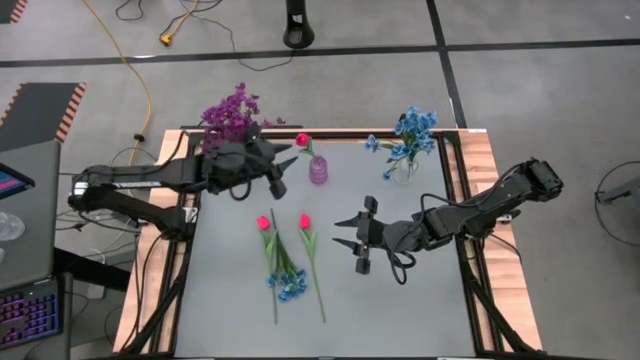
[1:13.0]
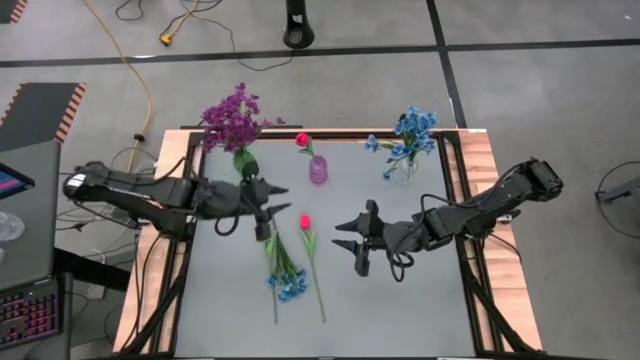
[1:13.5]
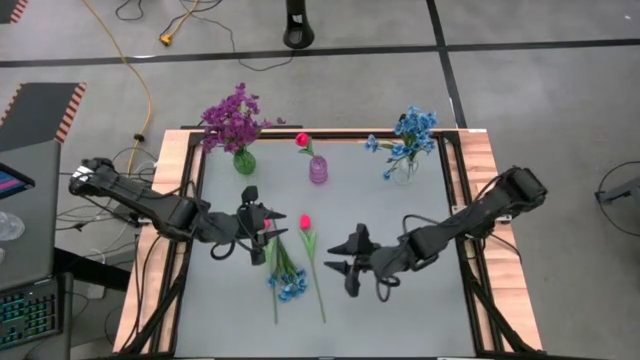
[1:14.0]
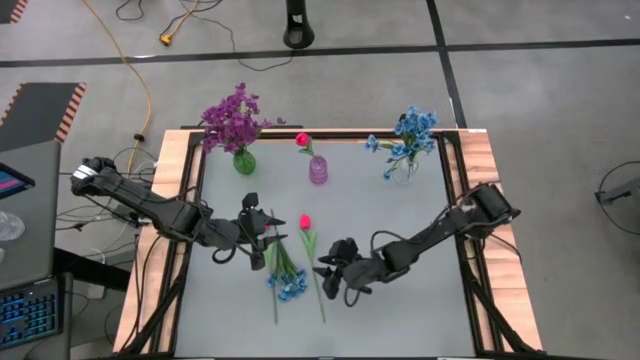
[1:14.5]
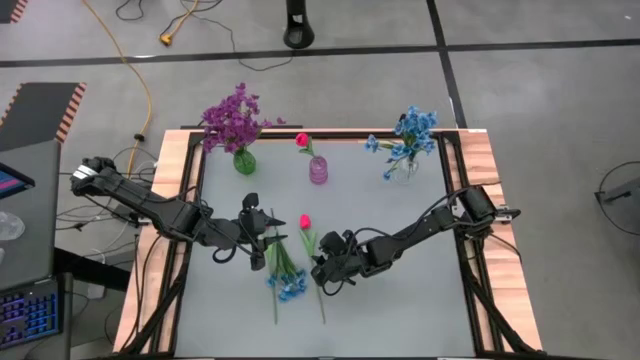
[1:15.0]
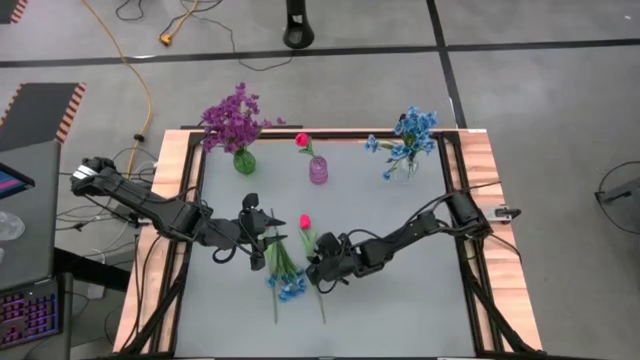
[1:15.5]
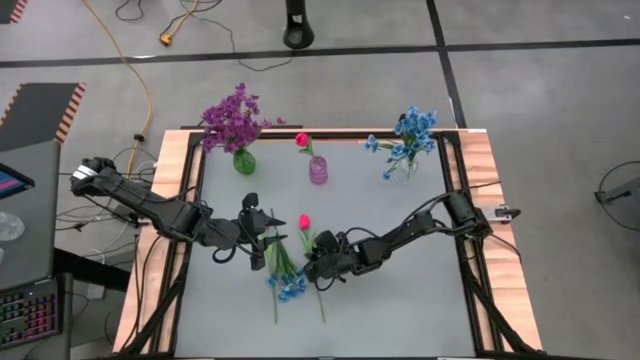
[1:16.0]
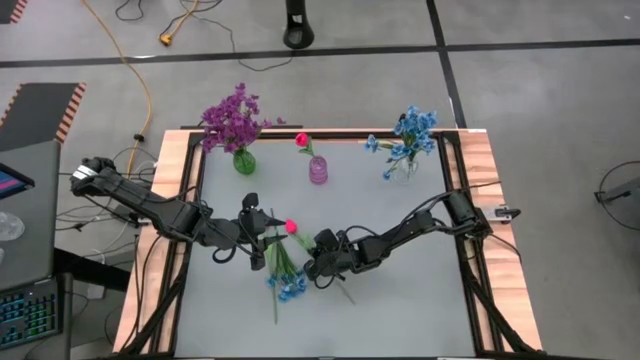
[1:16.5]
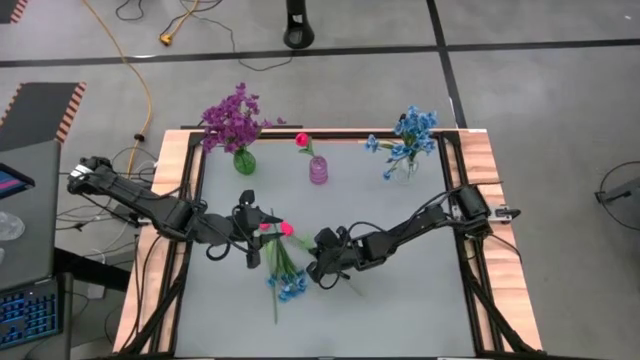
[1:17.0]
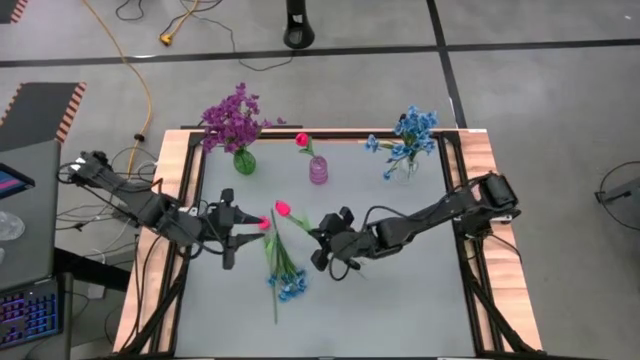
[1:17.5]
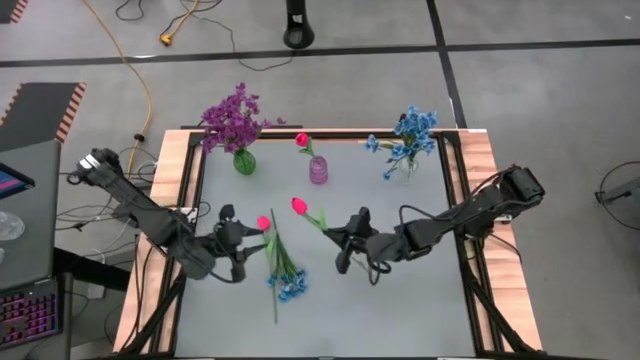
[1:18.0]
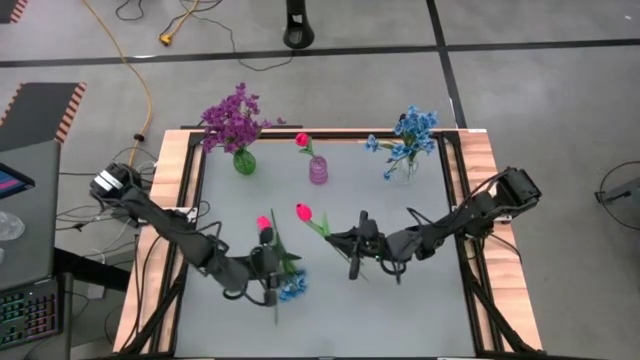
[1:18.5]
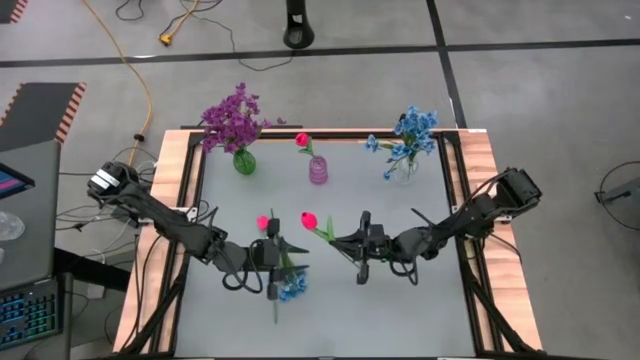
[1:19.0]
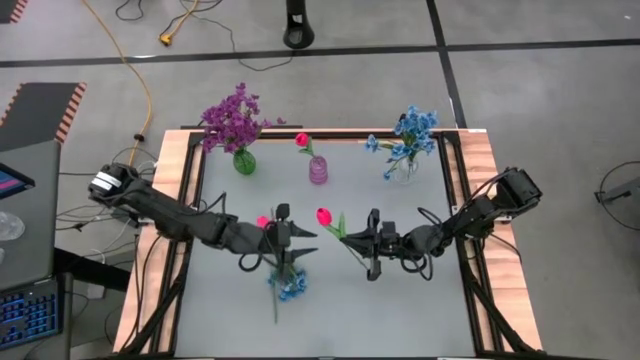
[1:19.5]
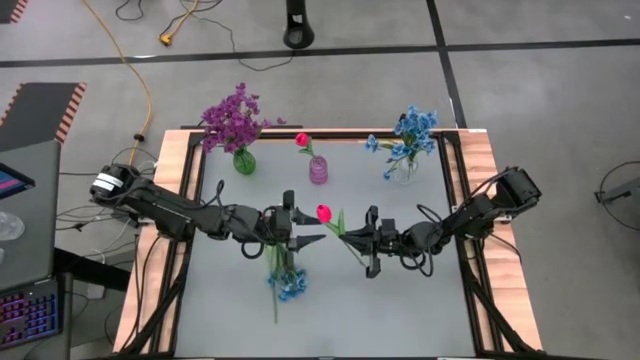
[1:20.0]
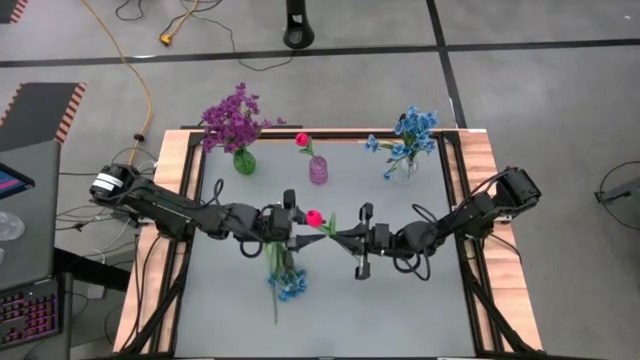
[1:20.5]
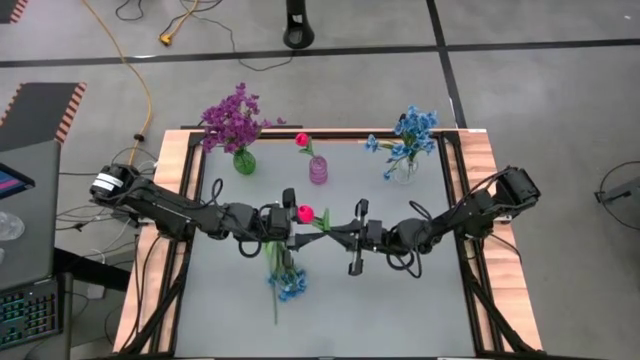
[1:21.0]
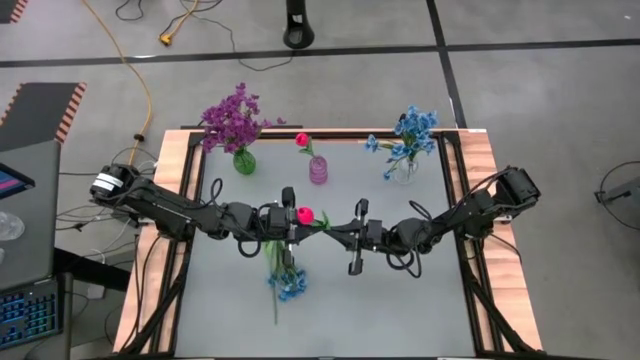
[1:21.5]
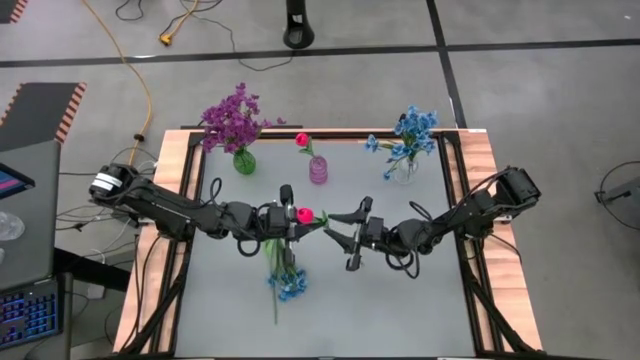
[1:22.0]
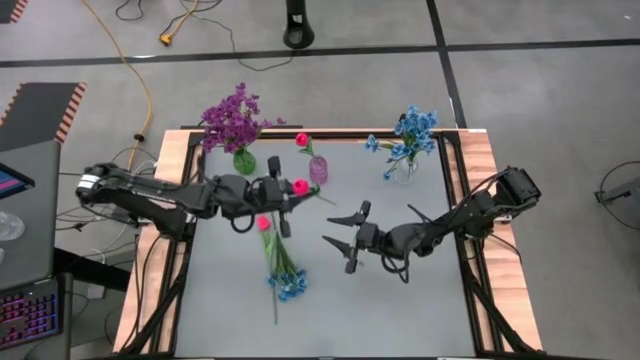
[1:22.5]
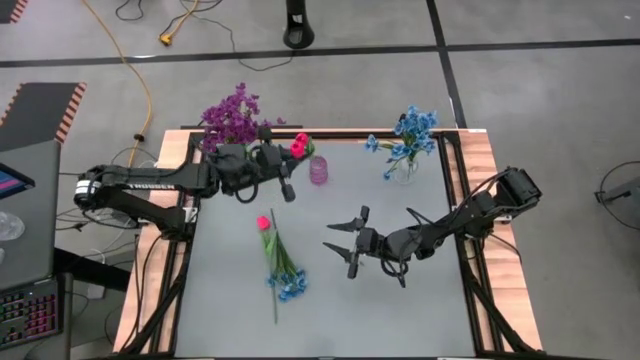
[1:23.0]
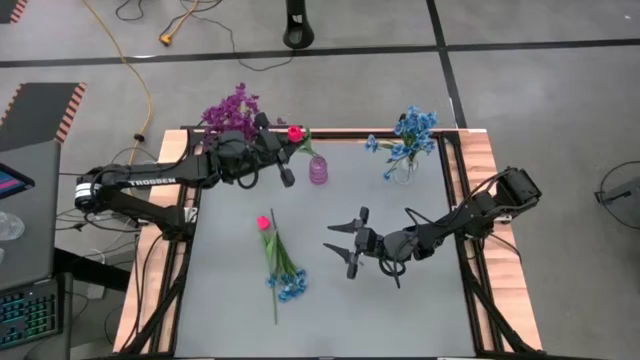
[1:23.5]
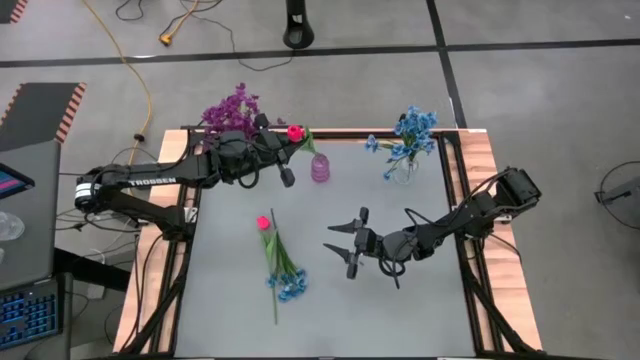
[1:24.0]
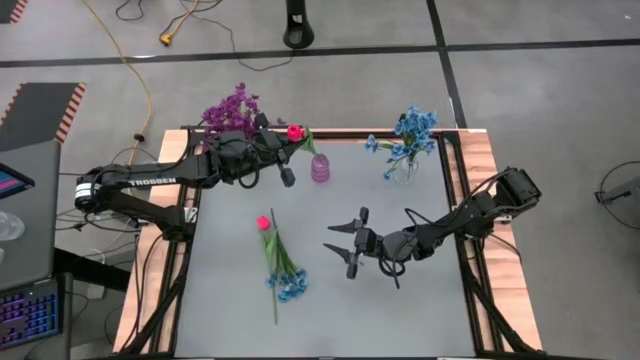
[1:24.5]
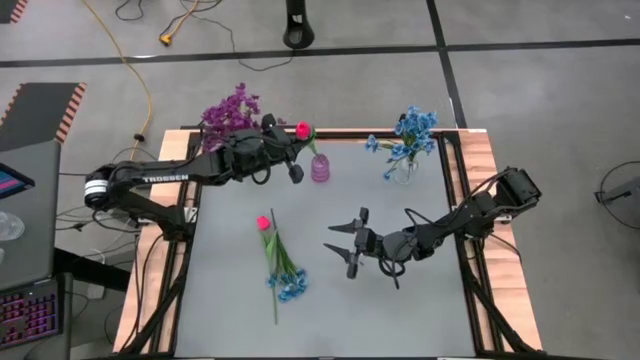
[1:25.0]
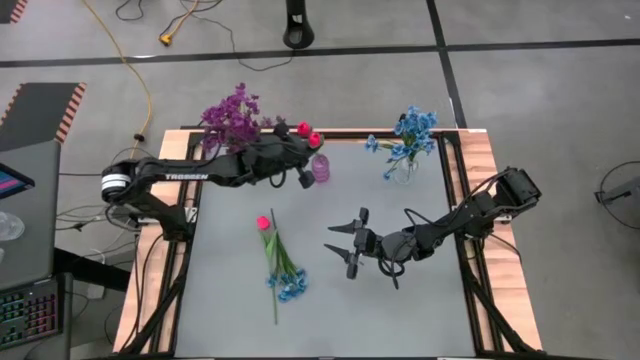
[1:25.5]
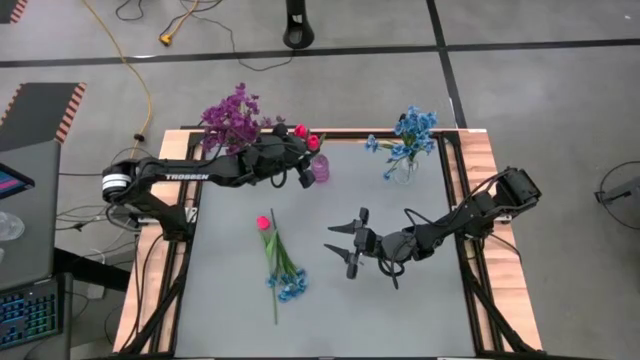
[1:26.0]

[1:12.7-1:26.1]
Task: Sort flowers into vase by color
Put the right pink flower into the purple vase

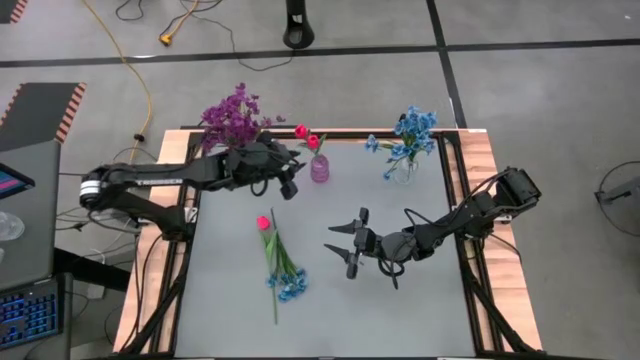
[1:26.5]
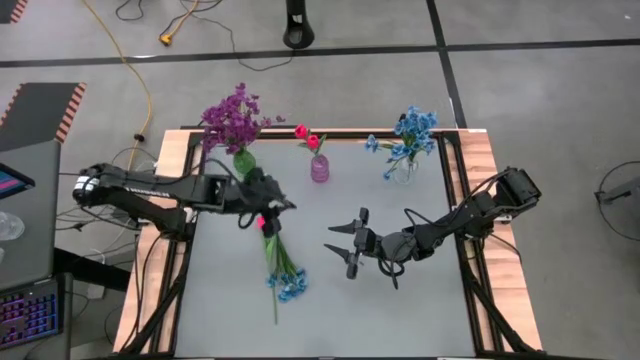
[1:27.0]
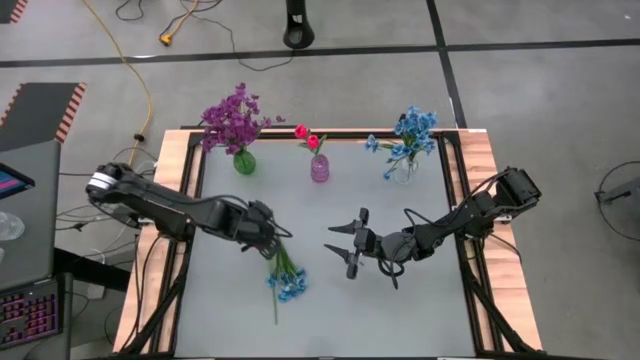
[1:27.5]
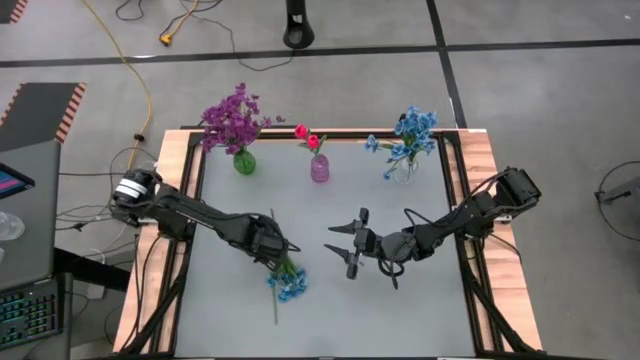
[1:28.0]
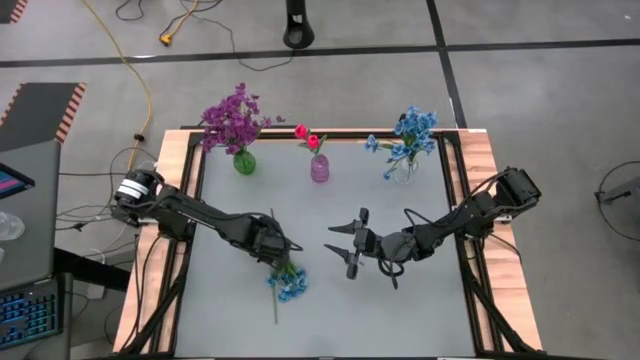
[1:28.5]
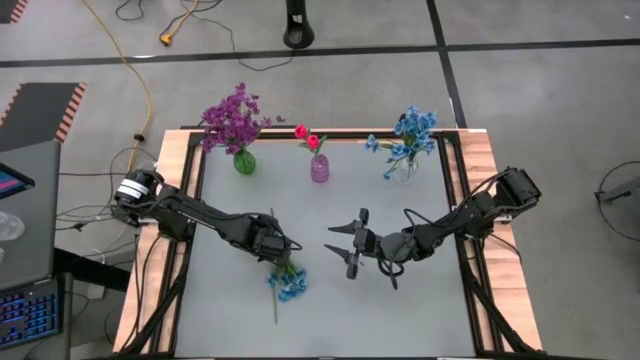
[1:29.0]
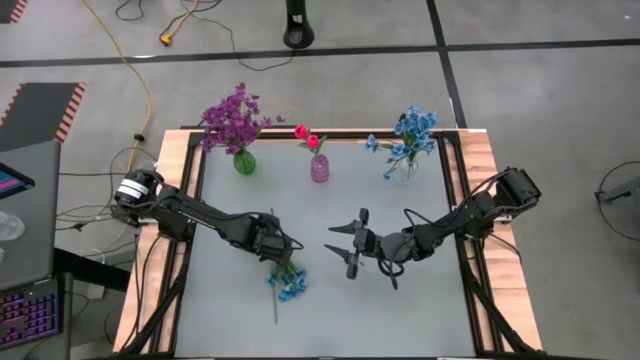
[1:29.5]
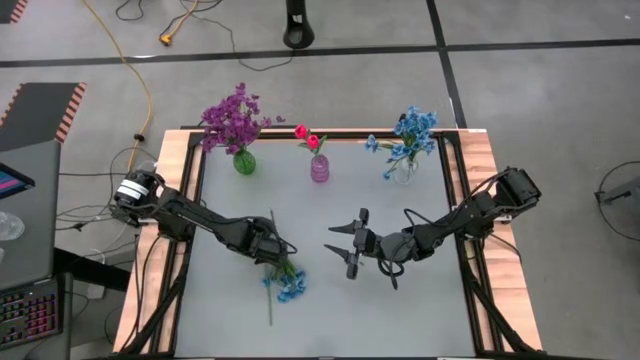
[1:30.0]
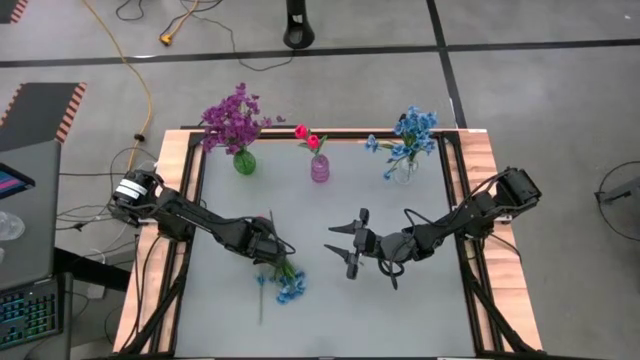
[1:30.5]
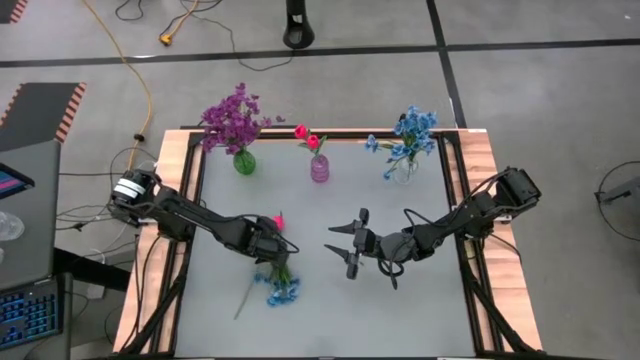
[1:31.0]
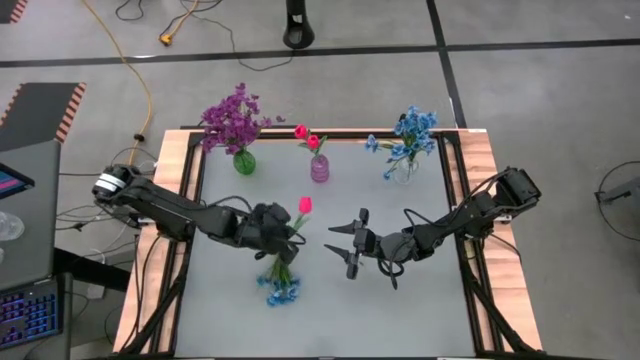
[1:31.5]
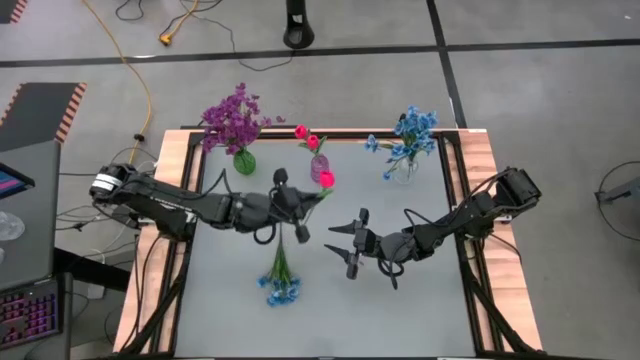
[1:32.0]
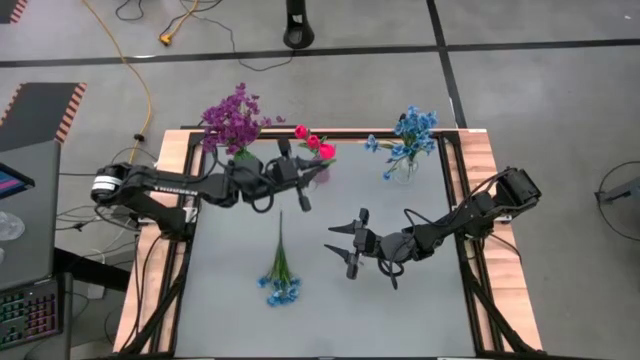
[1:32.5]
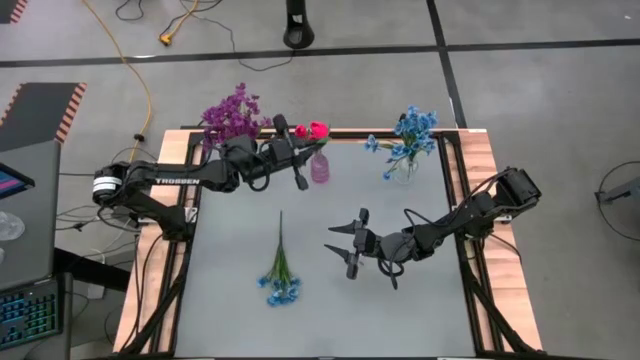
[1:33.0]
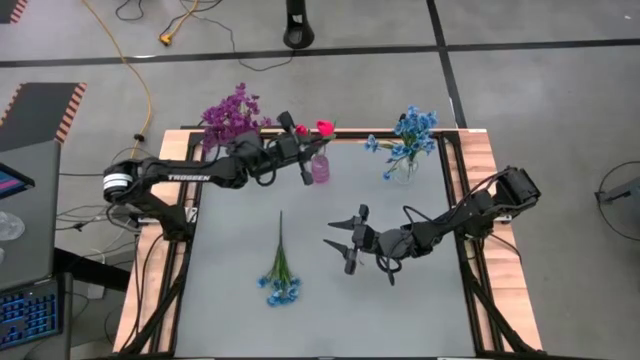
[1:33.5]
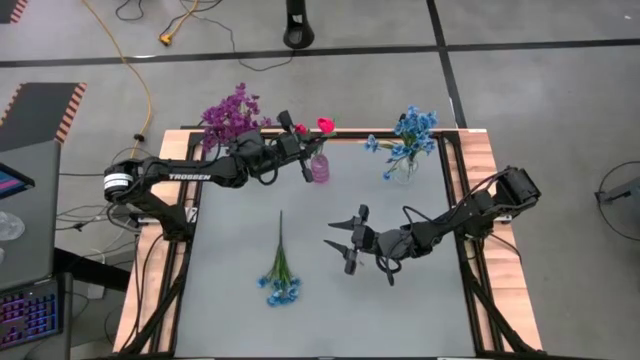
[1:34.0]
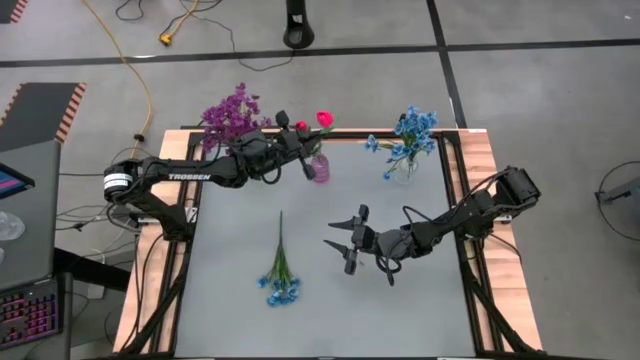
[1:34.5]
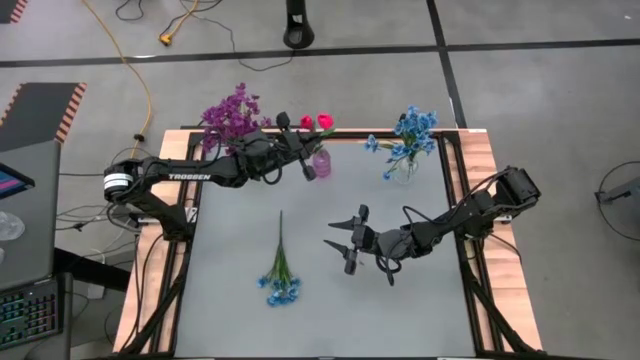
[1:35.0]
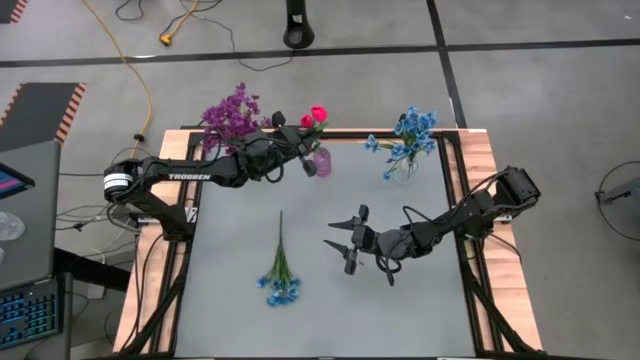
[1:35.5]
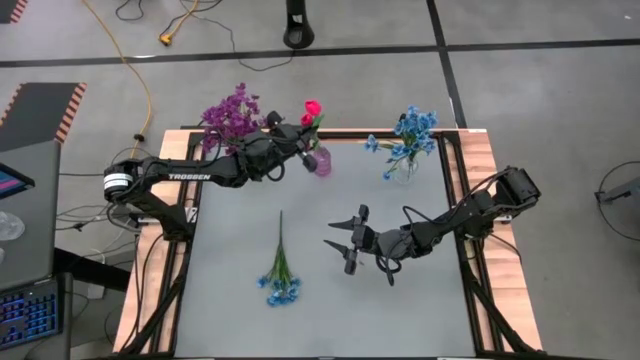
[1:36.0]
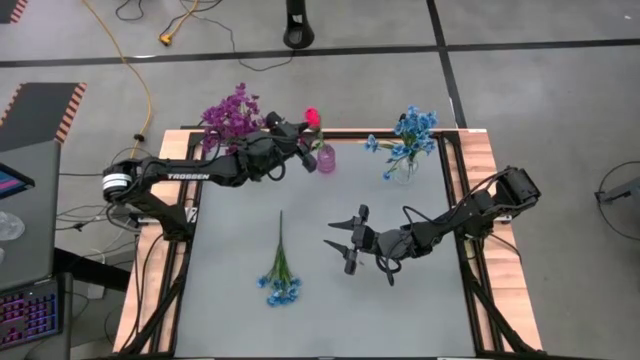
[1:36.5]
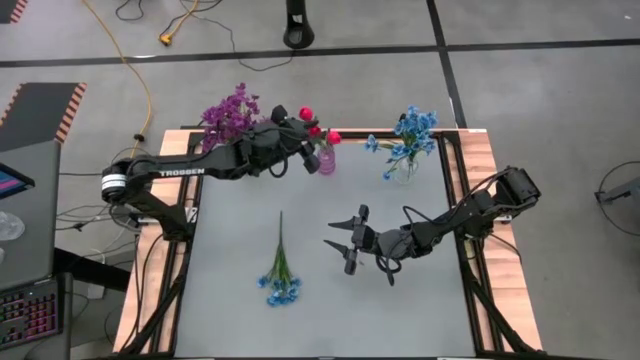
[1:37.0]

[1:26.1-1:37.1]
Put the pink flower into the purple vase
